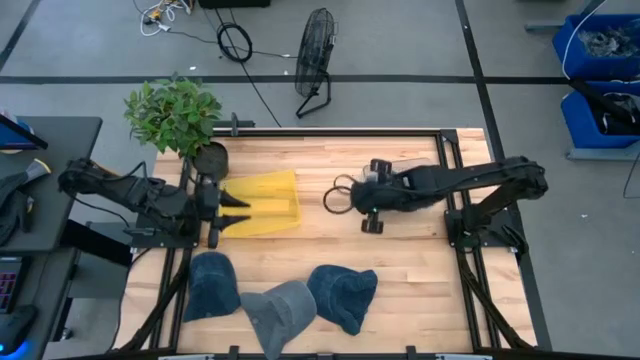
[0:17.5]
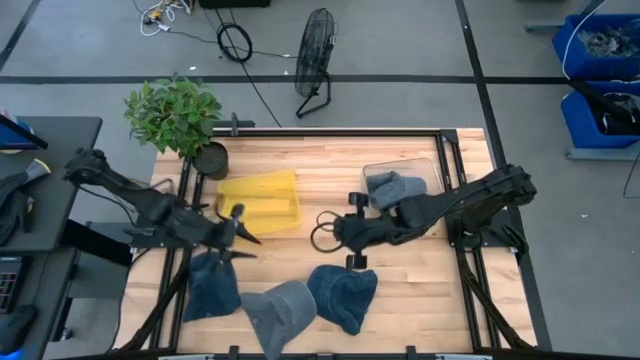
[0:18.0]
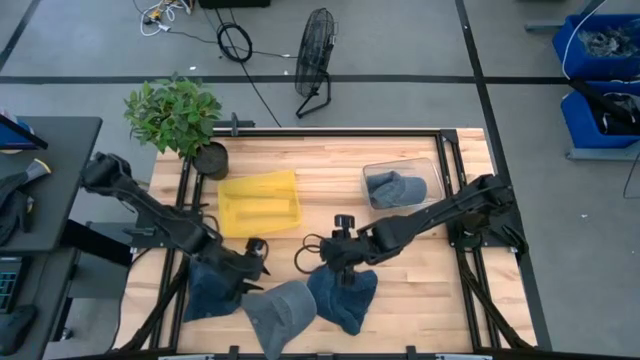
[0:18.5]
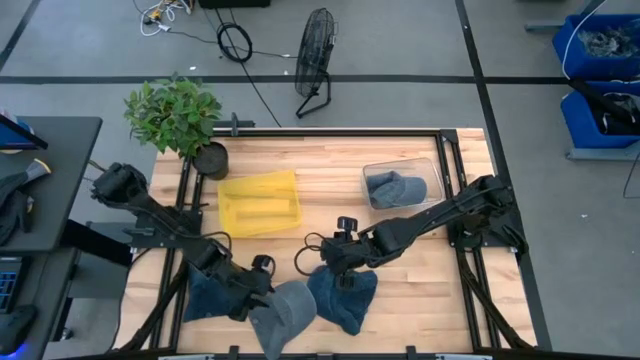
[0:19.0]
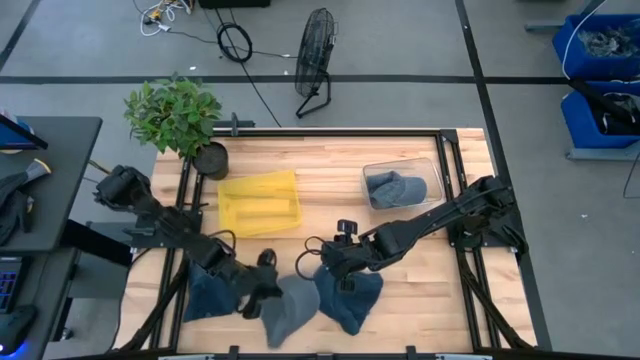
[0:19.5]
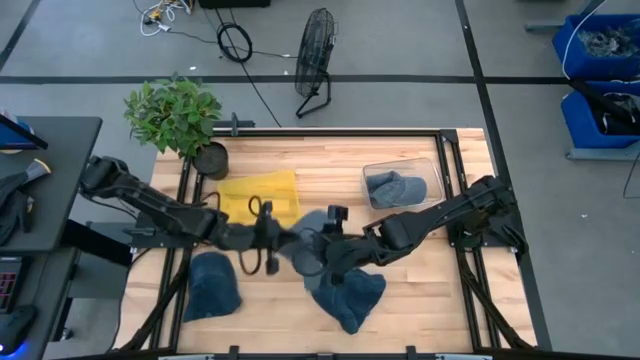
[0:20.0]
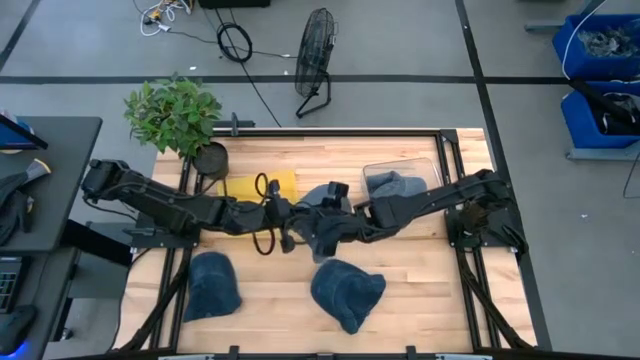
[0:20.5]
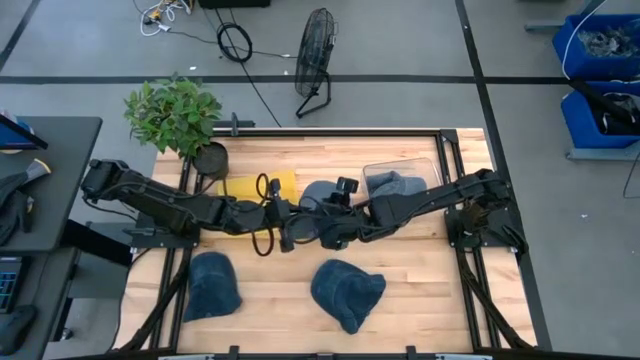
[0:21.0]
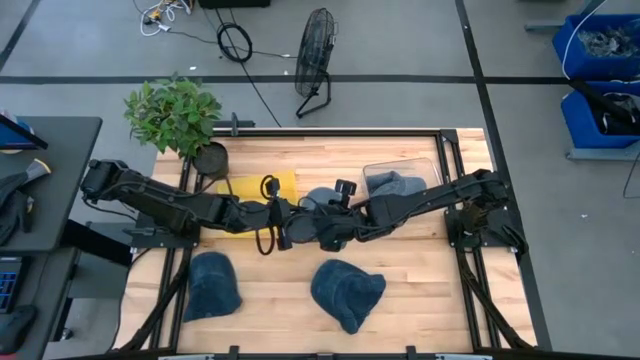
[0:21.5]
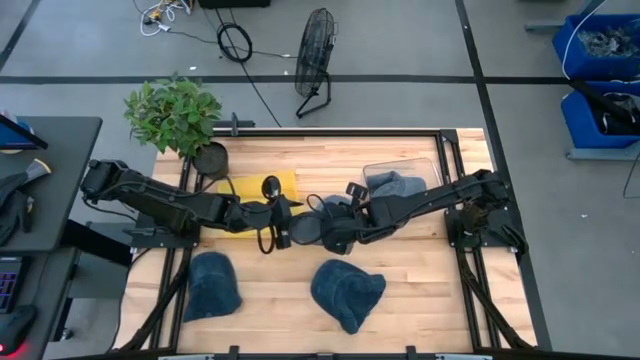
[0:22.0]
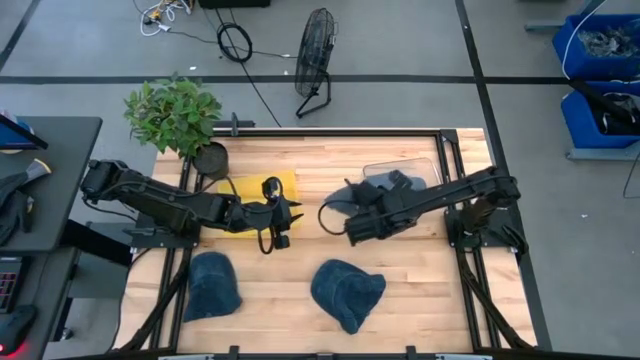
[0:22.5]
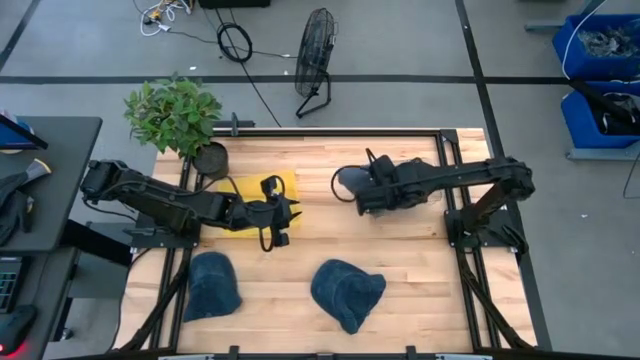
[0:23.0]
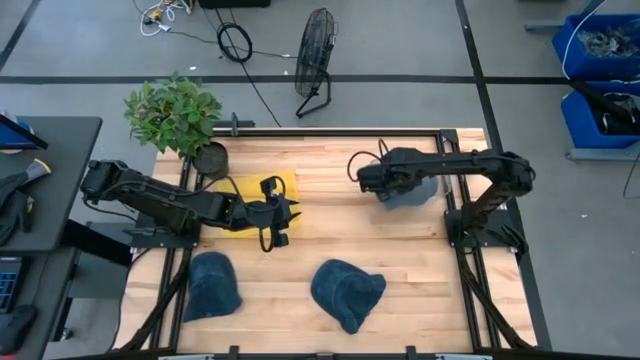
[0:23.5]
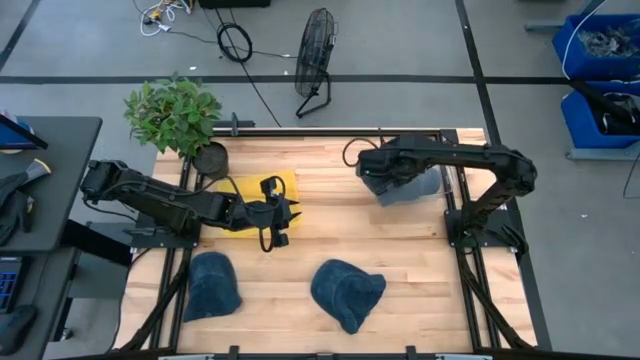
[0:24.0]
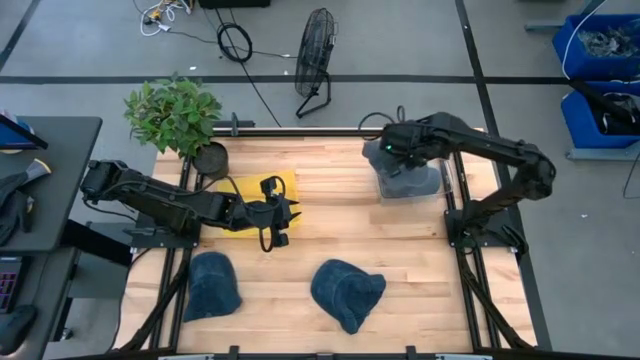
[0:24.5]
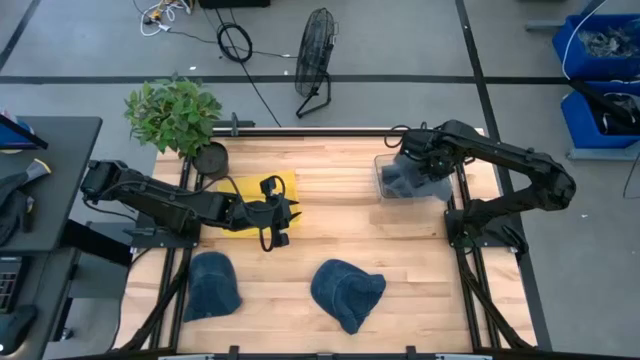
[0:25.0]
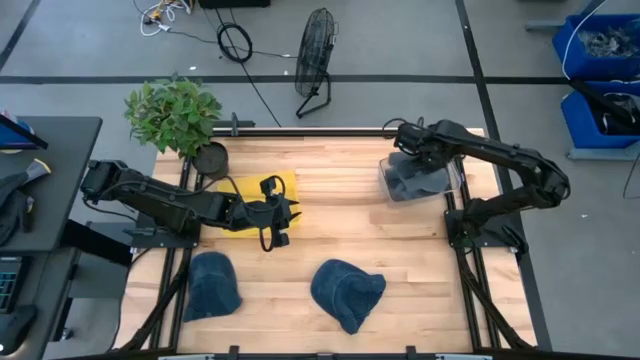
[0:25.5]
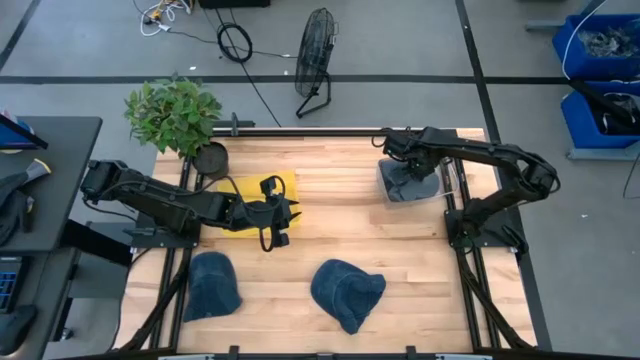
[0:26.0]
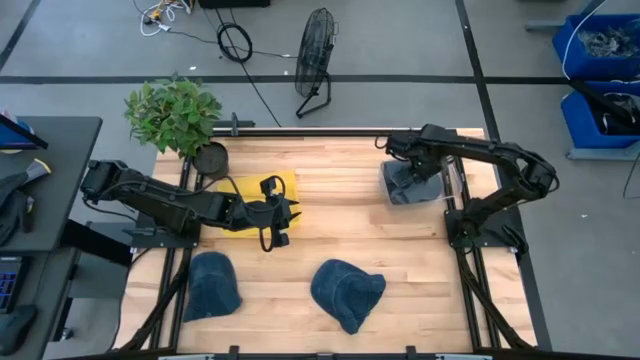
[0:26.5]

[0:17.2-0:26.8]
Task: Pick & Place hat
Put the gray cap into the transparent bin

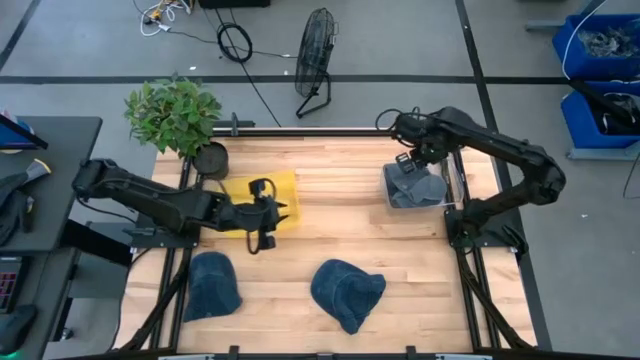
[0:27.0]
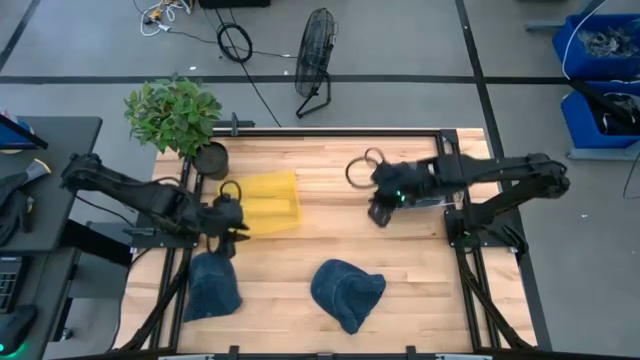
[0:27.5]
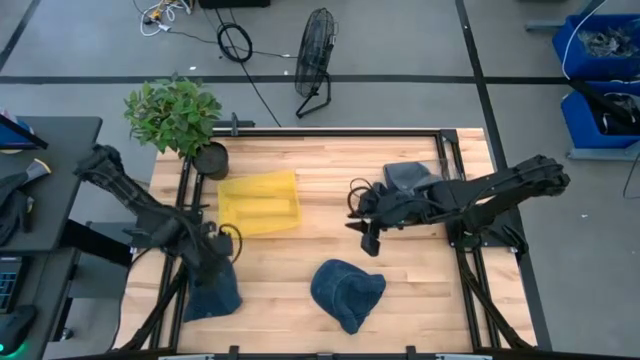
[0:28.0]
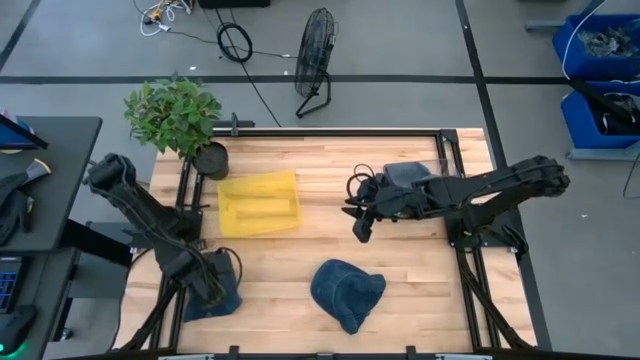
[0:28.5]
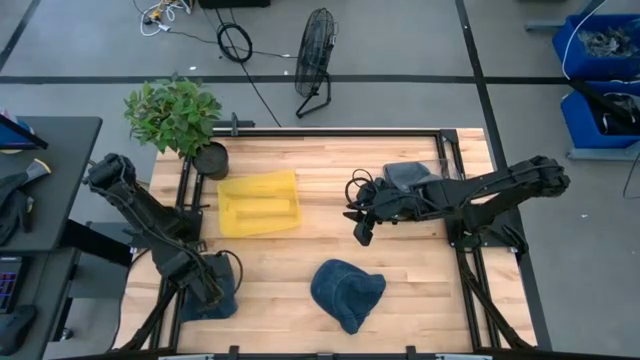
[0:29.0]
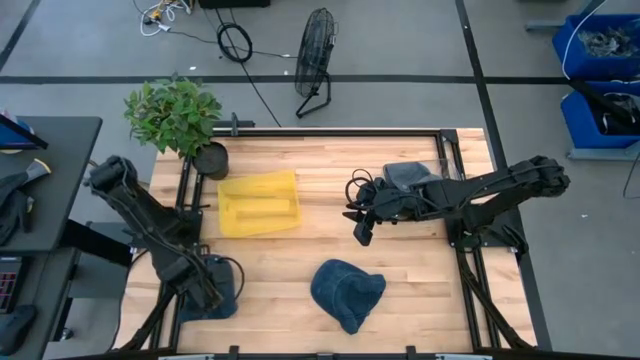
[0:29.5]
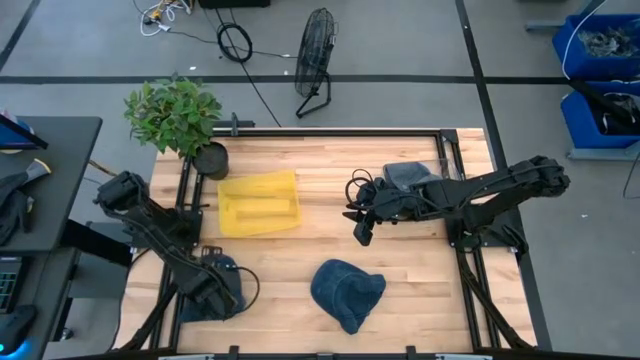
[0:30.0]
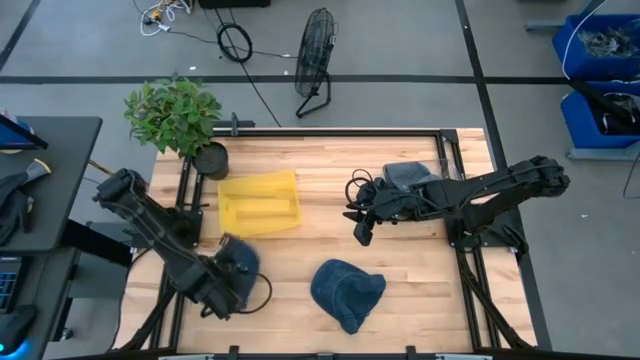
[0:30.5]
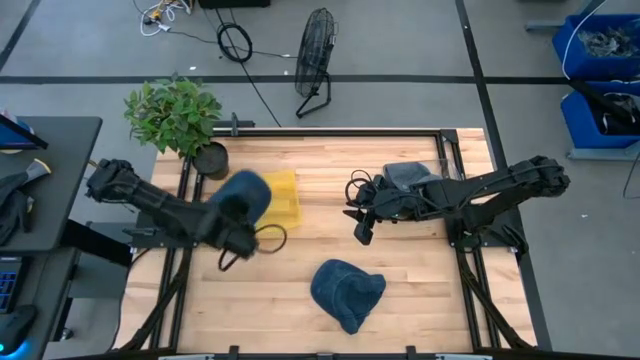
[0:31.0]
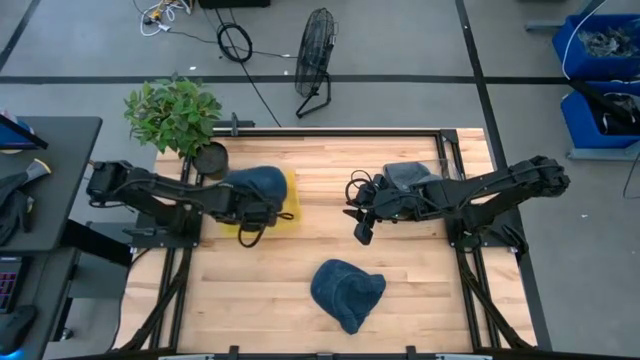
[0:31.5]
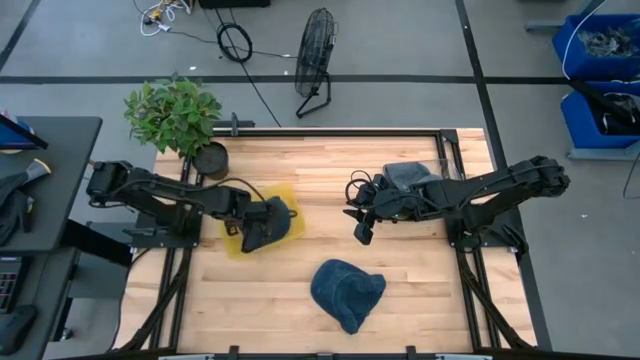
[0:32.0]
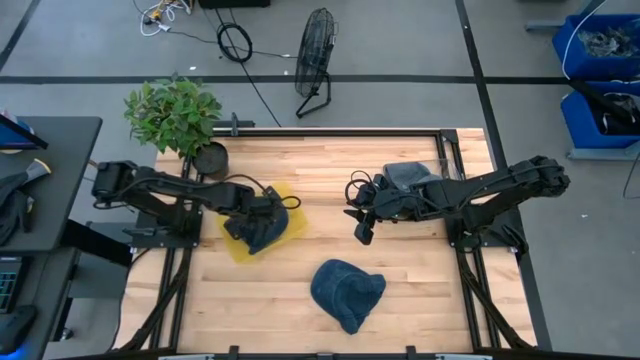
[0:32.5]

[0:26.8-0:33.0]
Put the left blue cap into the yellow bin

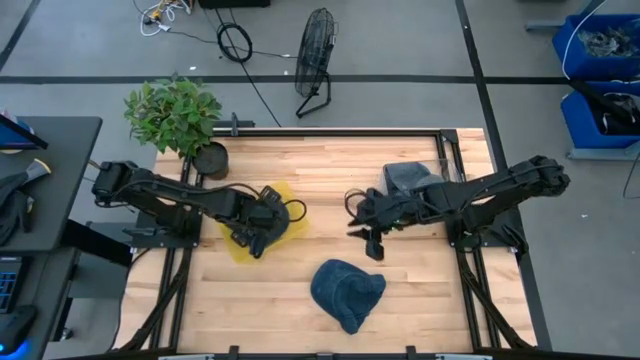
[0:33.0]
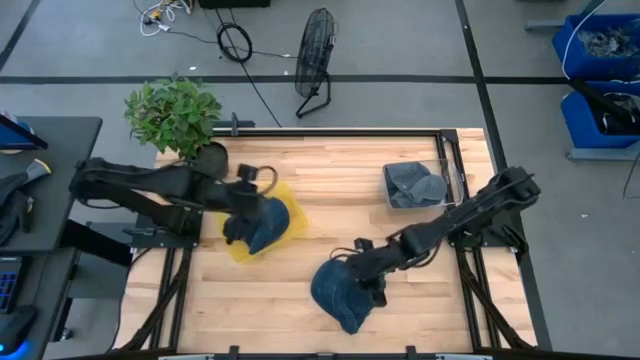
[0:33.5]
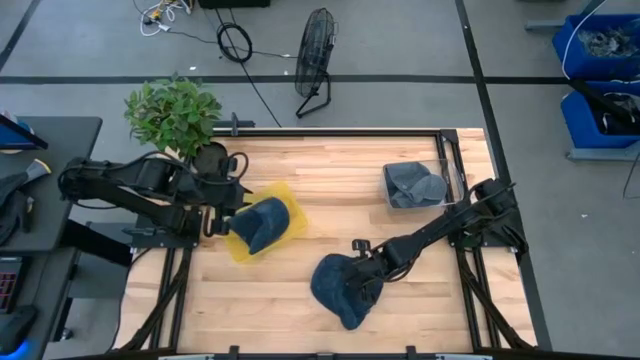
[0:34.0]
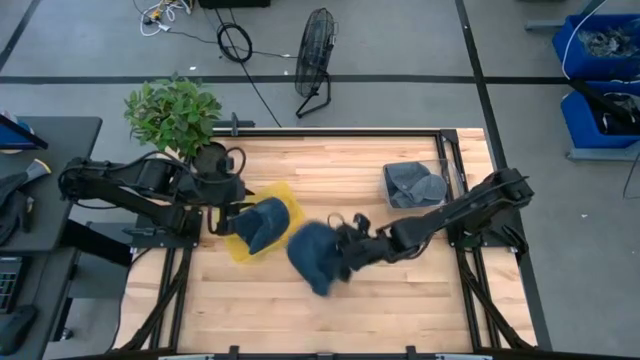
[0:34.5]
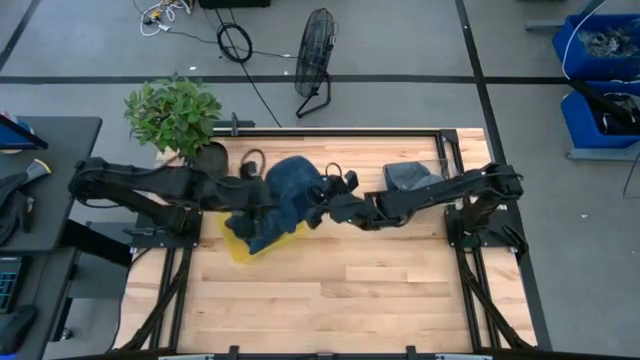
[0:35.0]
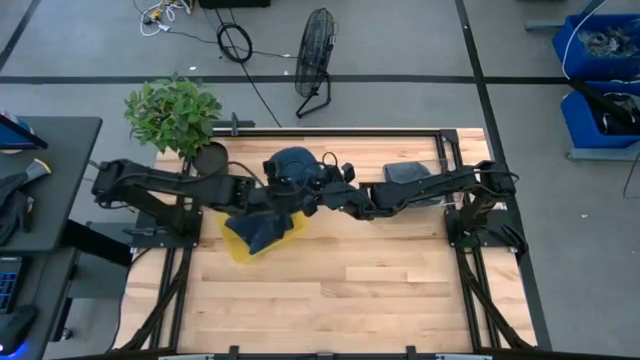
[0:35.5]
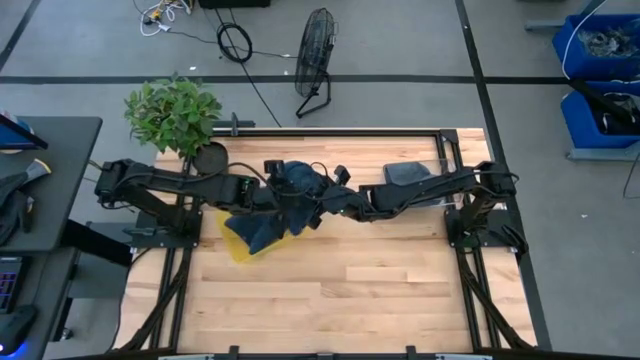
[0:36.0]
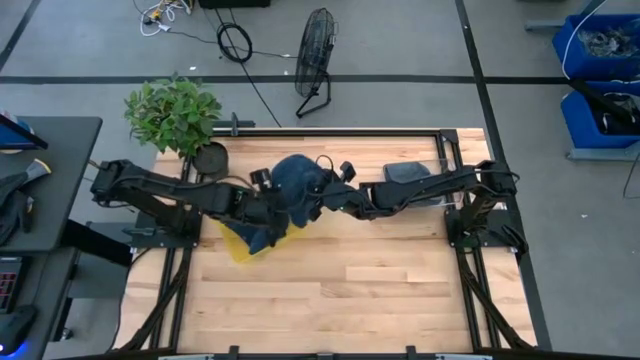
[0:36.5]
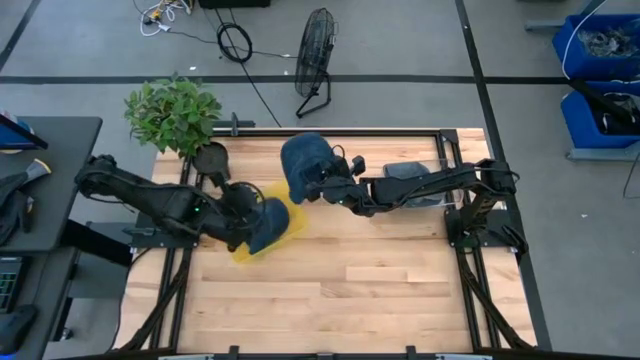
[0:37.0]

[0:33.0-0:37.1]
Put the blue cap into the yellow bin

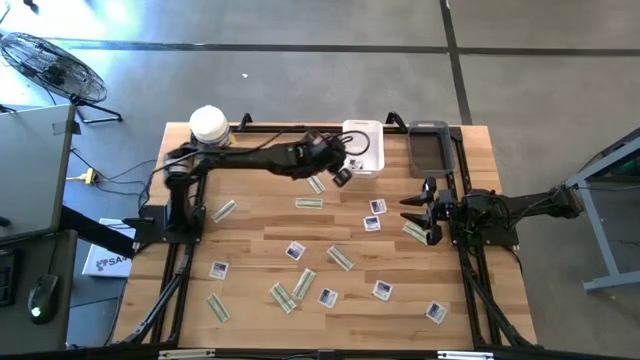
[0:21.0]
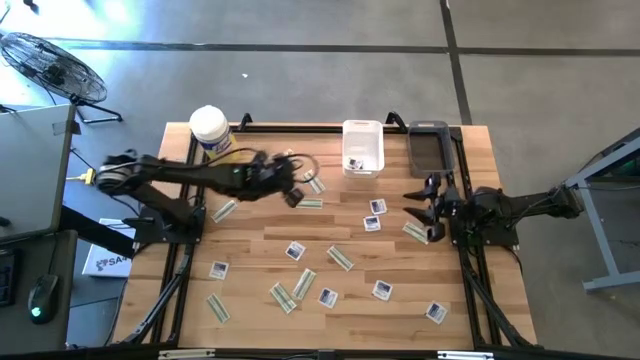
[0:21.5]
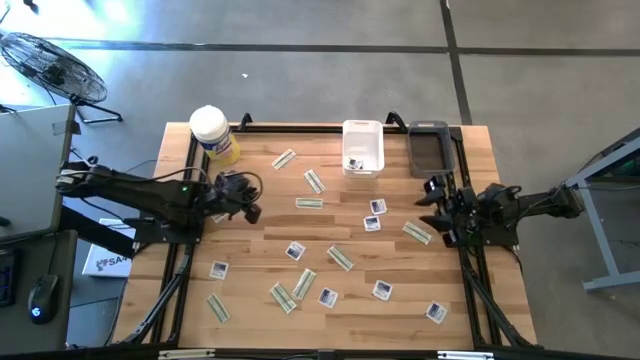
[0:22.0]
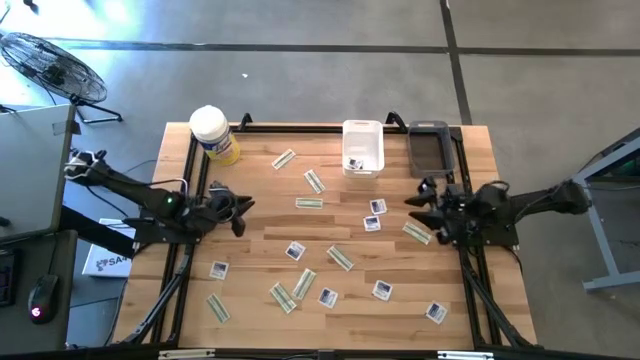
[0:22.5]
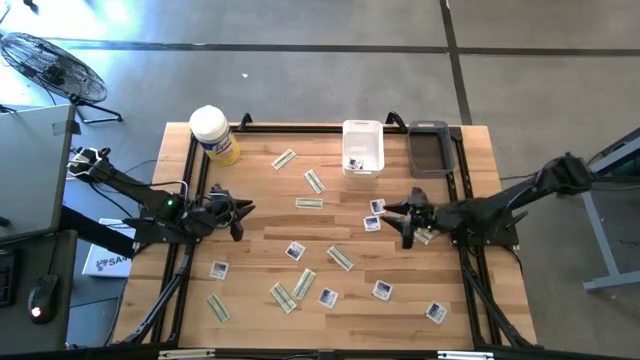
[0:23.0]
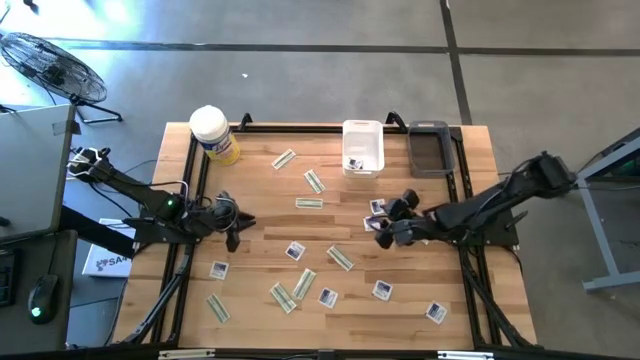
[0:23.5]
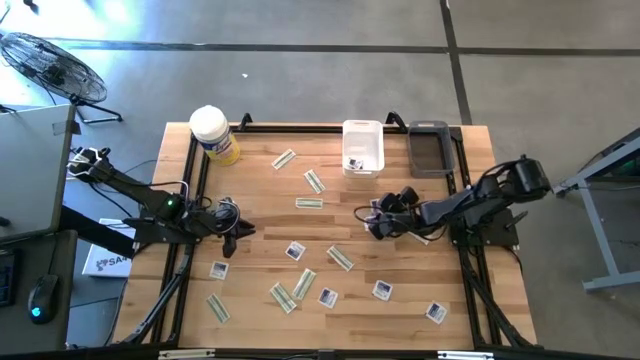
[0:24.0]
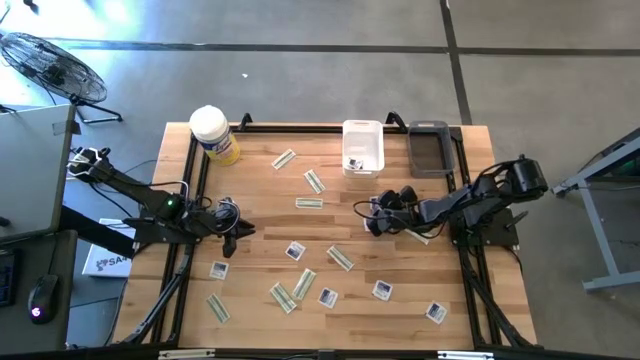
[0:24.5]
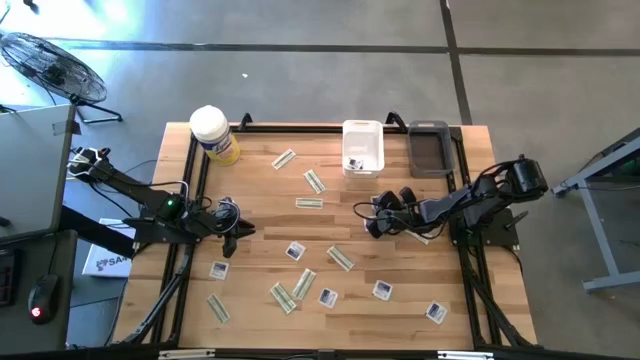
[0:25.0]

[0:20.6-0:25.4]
Task: Pick & Place First Aid Supplies
Put the blue alcohol pad into the white bin
